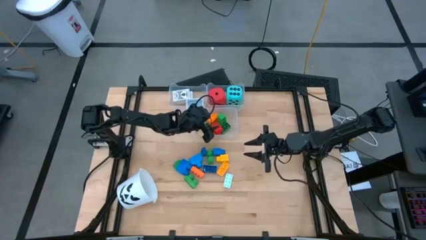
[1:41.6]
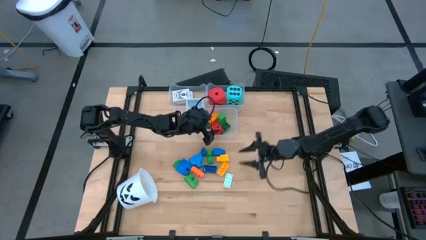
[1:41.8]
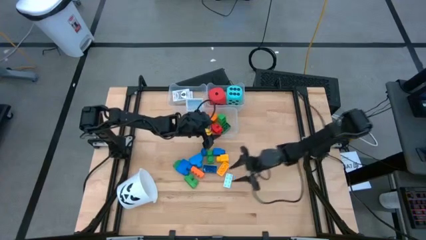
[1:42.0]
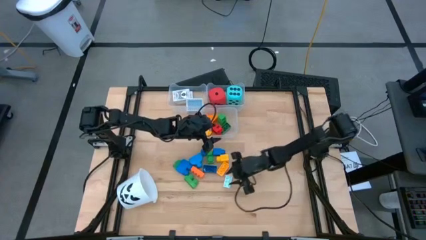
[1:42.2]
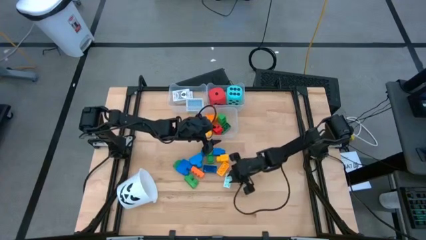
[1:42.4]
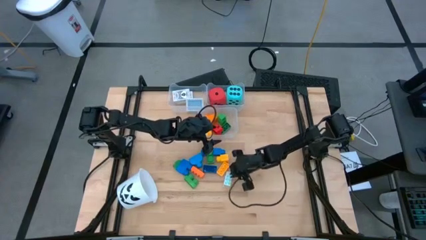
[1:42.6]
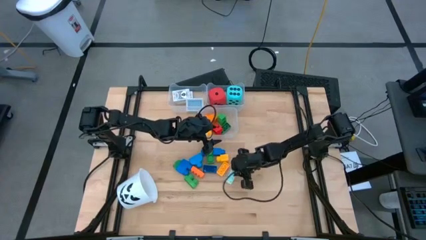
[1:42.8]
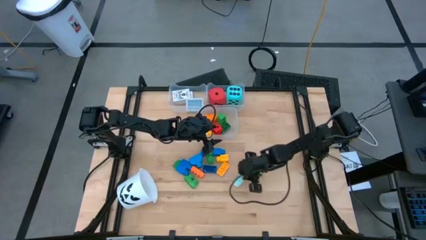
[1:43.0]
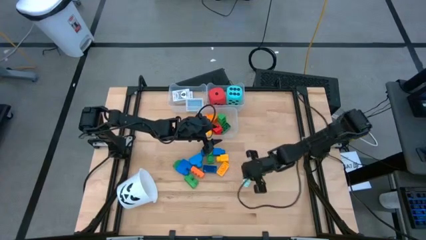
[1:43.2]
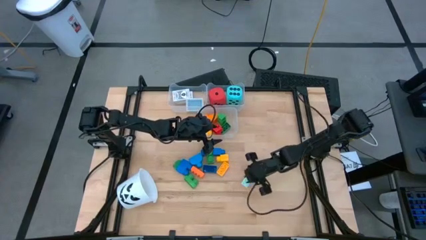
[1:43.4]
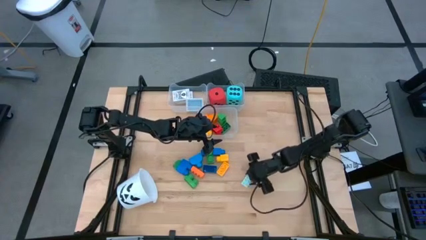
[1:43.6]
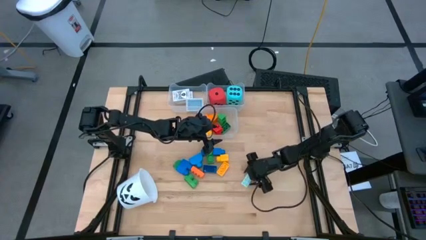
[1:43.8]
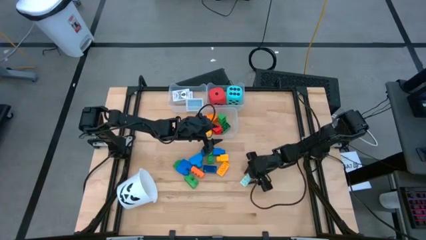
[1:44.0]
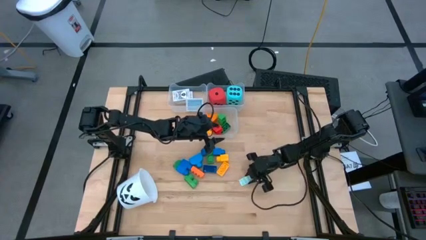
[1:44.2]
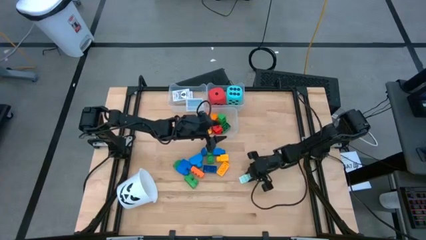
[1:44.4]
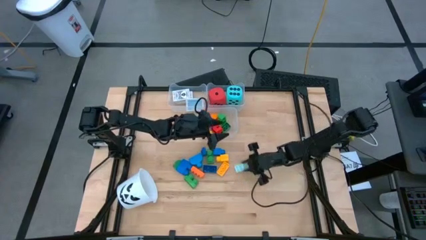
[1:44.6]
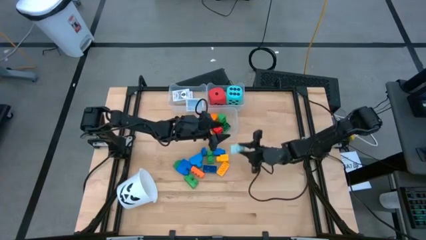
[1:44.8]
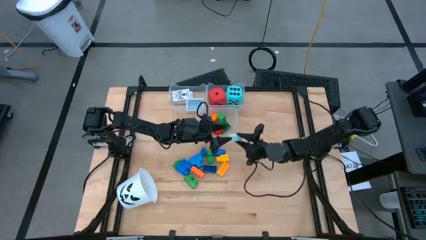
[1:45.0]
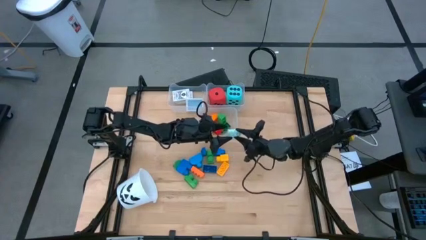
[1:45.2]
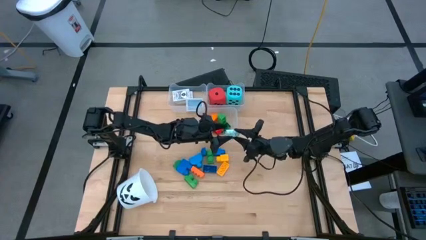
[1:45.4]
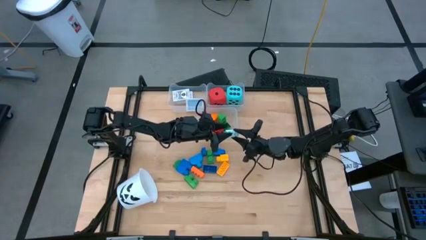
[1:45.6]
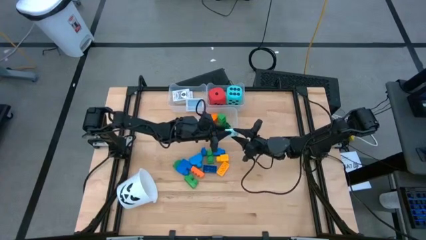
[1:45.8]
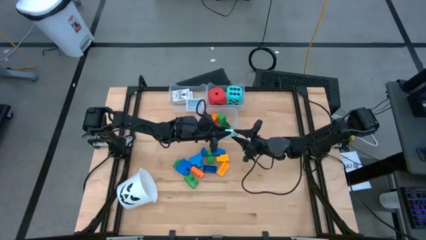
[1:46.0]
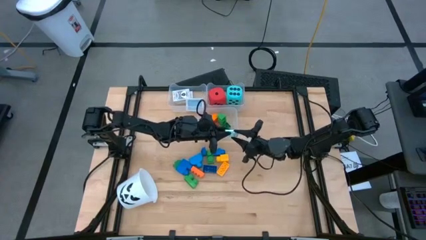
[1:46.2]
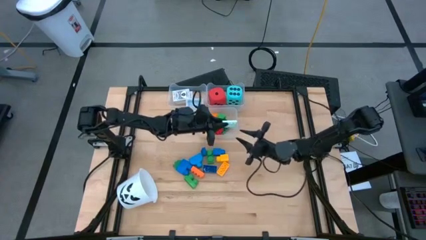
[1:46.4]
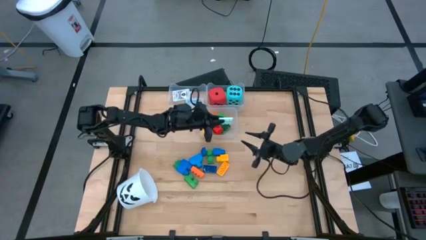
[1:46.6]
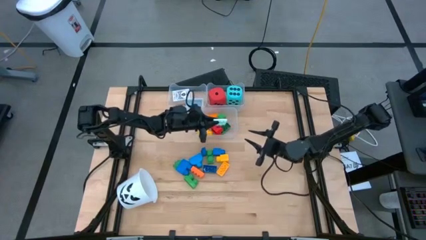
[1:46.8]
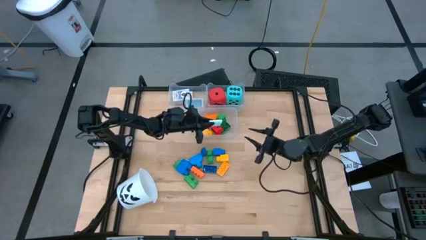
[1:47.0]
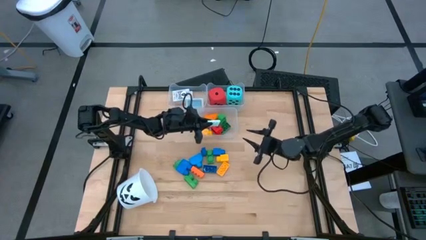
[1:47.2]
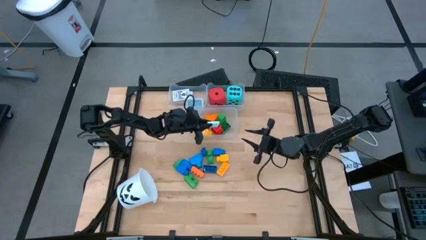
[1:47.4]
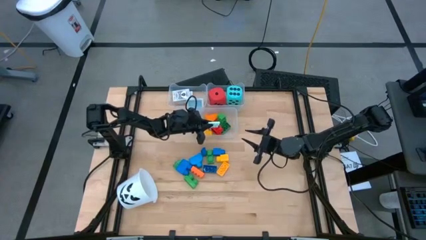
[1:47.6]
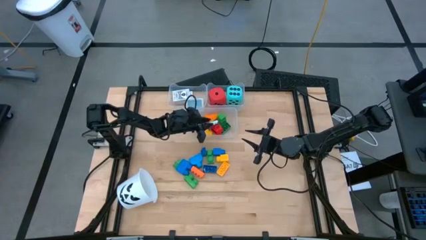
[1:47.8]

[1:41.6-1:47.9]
Task: Pick & Place Toys
Put the light blue game piece into the bottom transparent bin

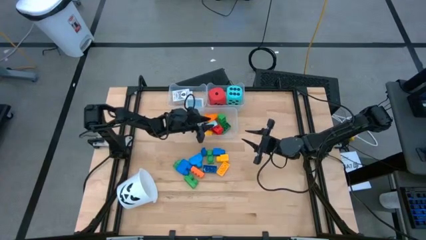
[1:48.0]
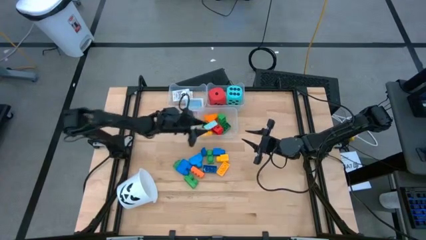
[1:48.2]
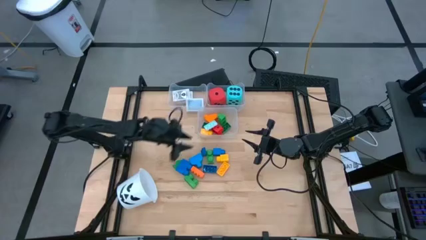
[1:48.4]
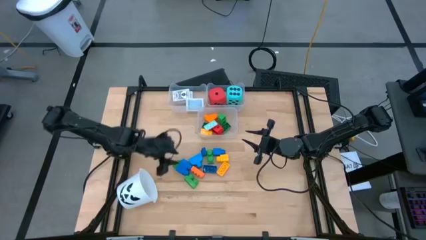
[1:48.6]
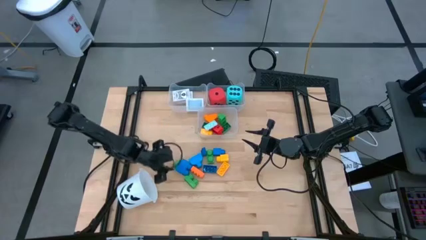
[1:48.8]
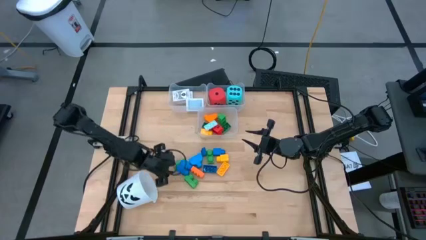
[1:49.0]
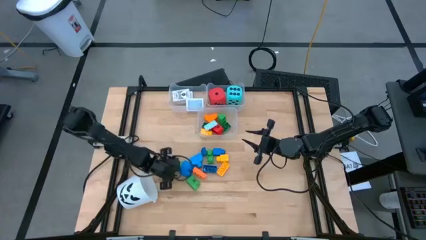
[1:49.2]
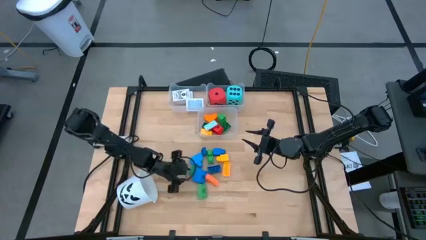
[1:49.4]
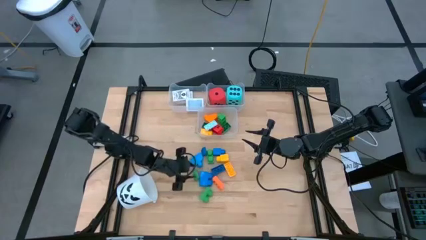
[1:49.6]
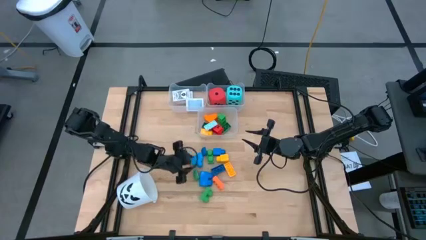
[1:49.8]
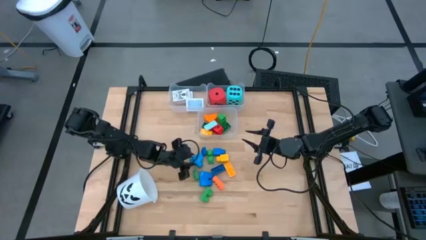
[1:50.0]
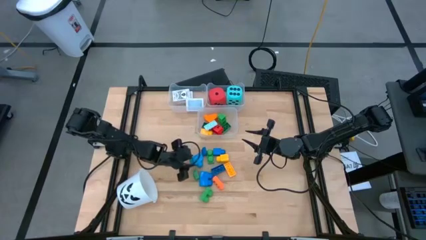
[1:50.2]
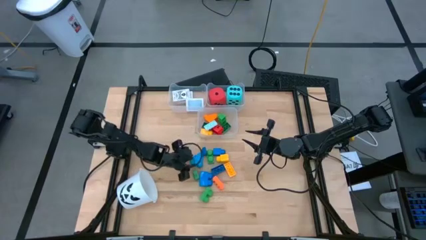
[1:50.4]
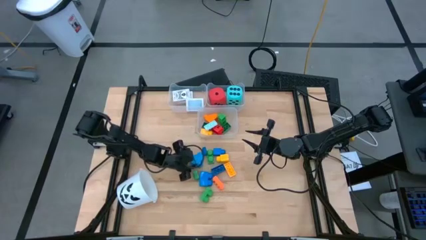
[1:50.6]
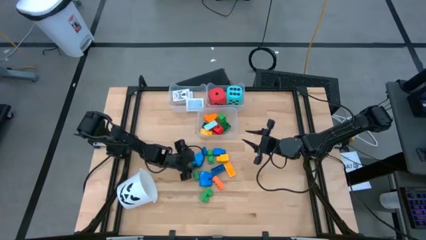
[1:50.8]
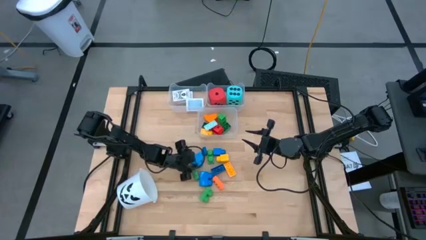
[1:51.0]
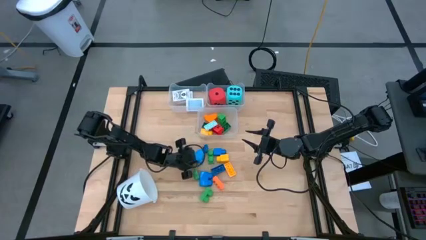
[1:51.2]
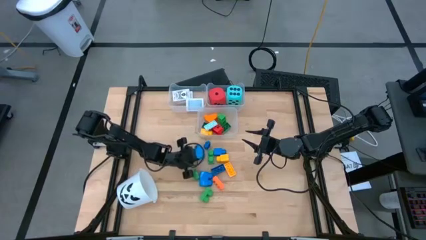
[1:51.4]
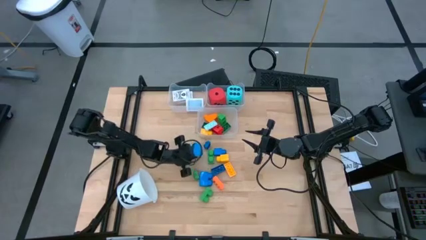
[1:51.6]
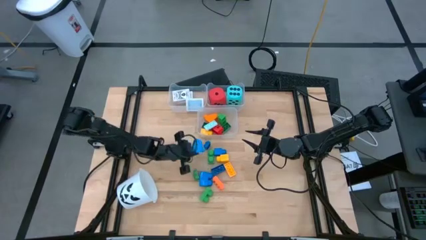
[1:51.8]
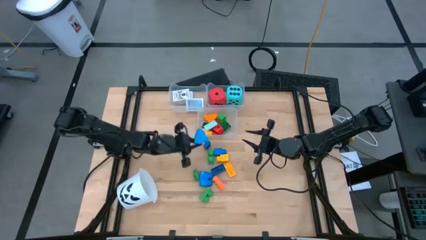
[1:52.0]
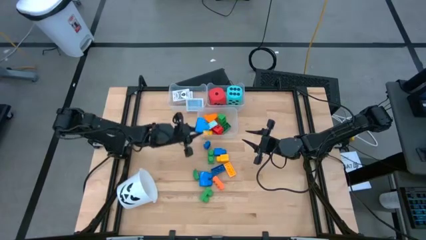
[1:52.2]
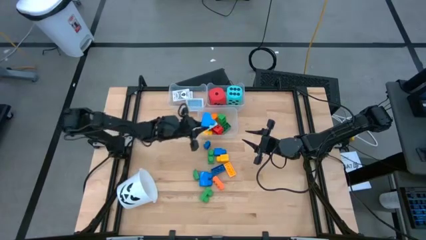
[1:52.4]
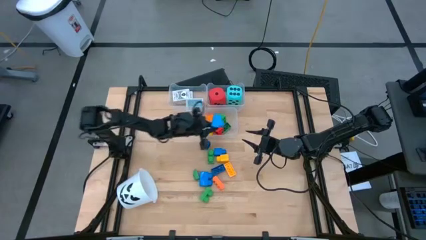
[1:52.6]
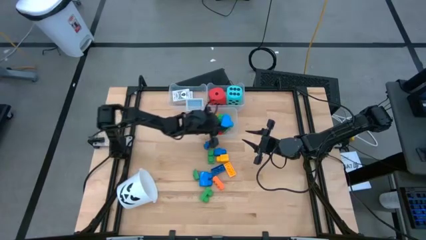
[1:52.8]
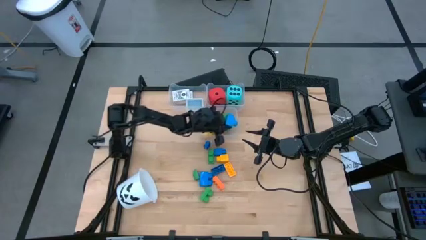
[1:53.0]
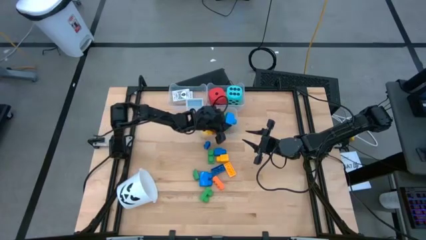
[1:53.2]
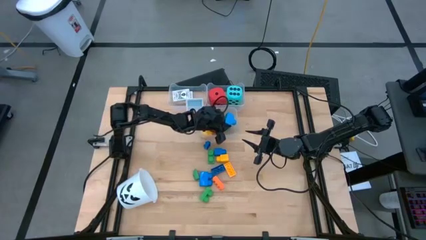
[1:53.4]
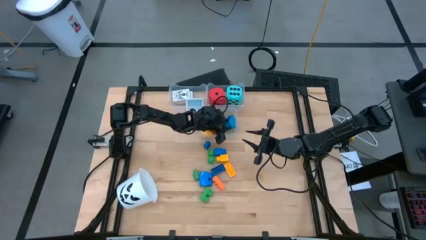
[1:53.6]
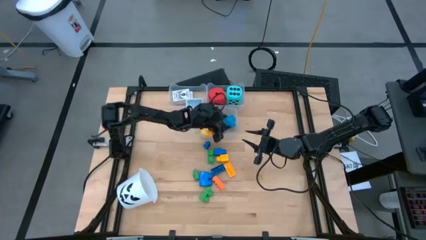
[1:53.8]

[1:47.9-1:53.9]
Put the blue game piece into the bottom transparent bin

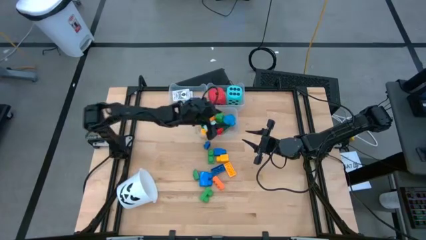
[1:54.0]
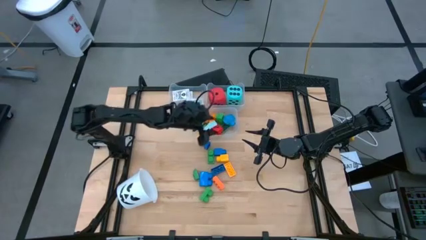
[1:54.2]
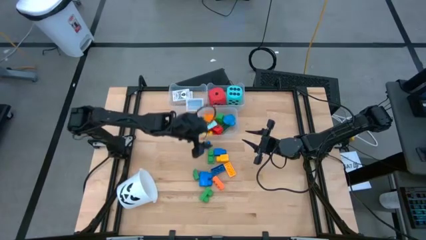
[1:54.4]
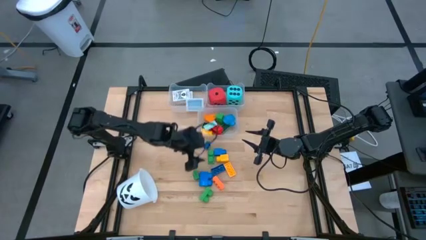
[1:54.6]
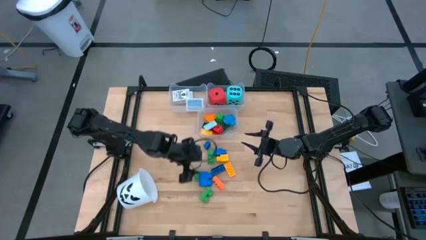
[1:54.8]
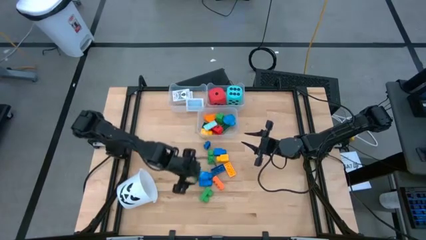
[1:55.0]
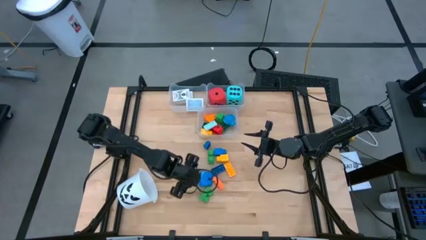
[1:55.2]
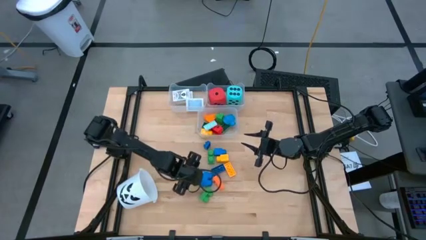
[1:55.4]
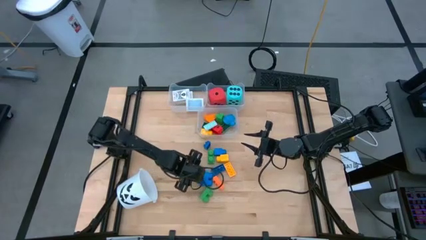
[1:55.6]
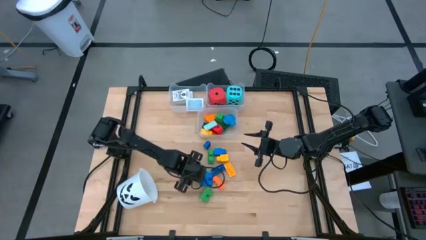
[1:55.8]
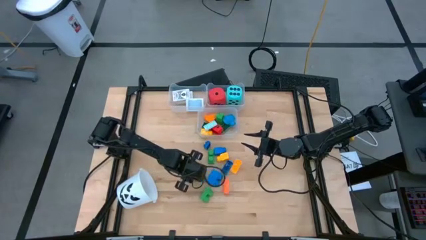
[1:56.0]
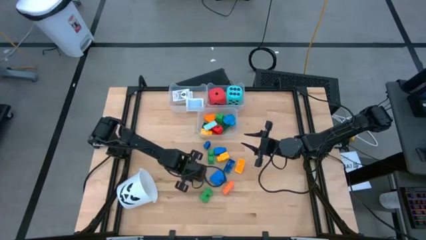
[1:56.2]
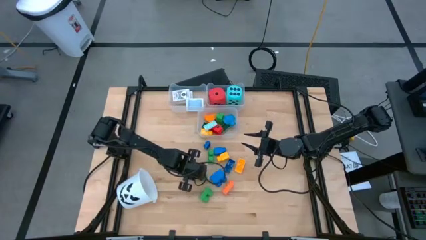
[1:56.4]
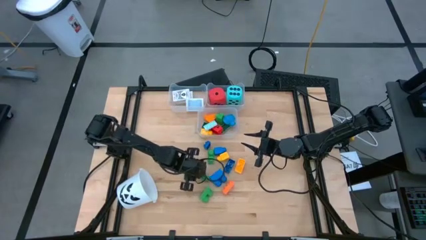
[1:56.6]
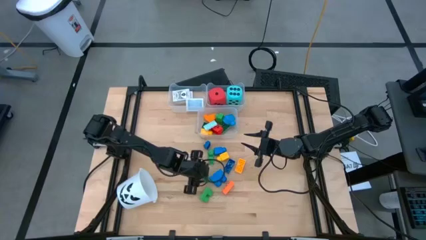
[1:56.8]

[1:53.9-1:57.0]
Put the left green game piece into the bottom transparent bin

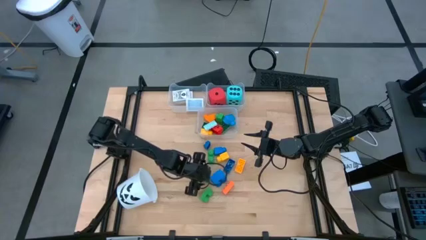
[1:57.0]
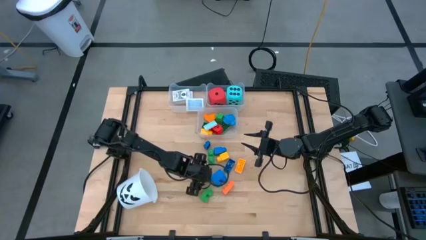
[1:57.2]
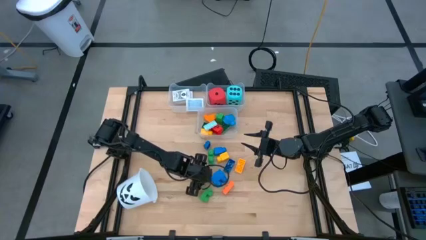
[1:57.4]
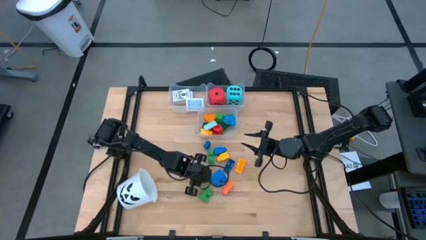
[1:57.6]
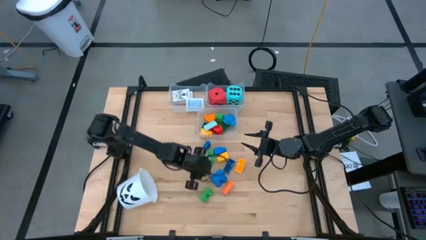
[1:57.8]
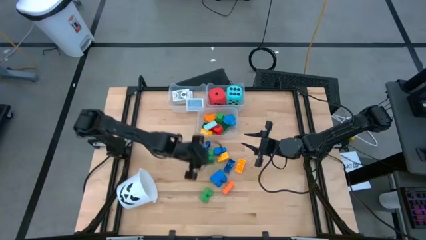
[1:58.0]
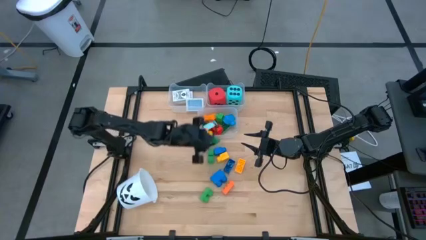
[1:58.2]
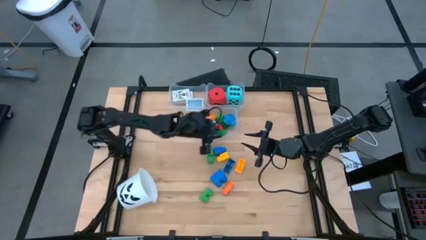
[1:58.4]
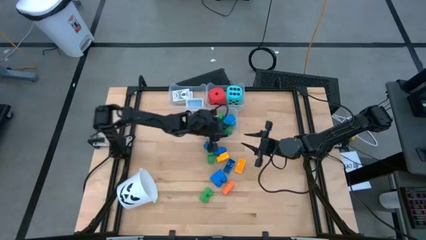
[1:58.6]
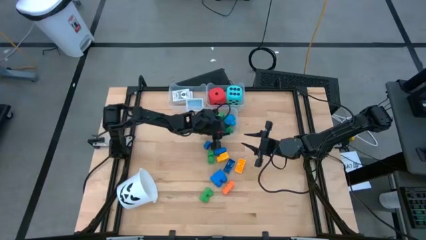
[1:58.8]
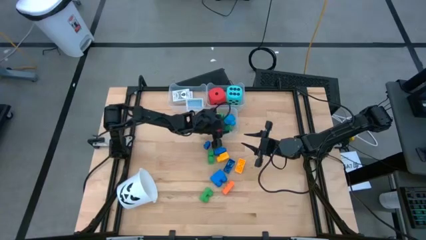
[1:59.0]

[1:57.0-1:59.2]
Put the left green game piece into the bottom transparent bin
